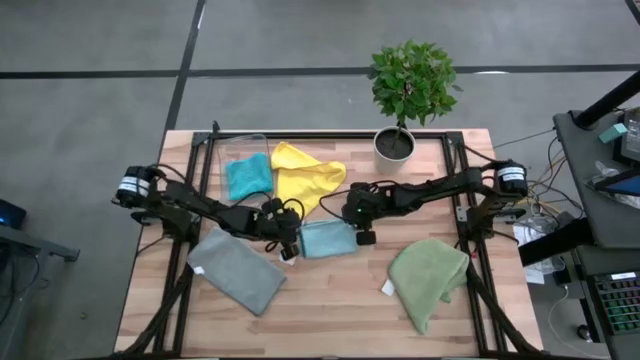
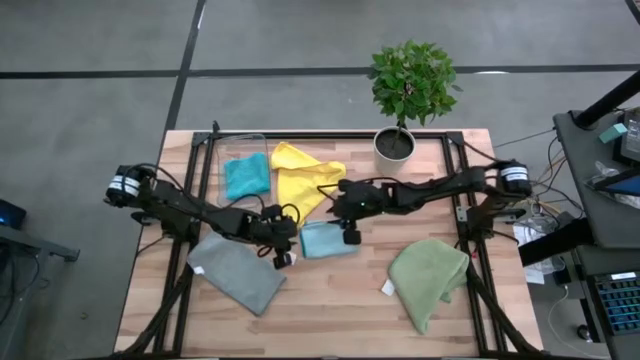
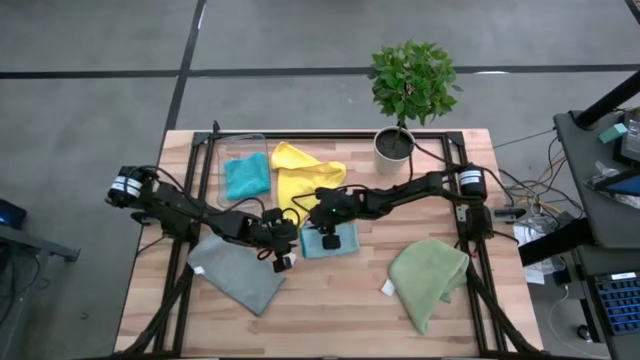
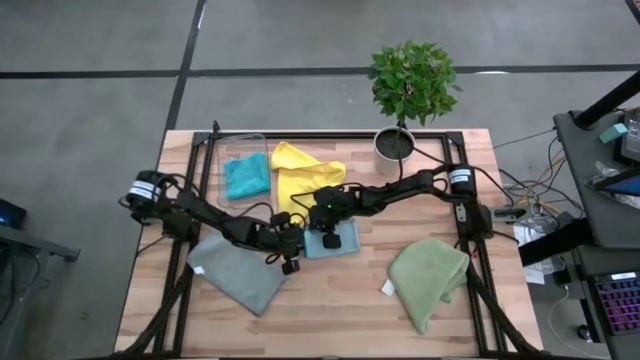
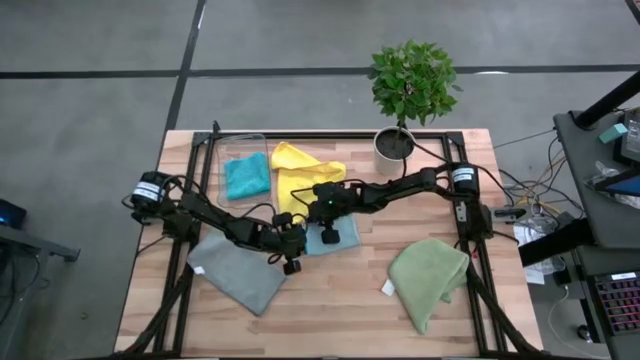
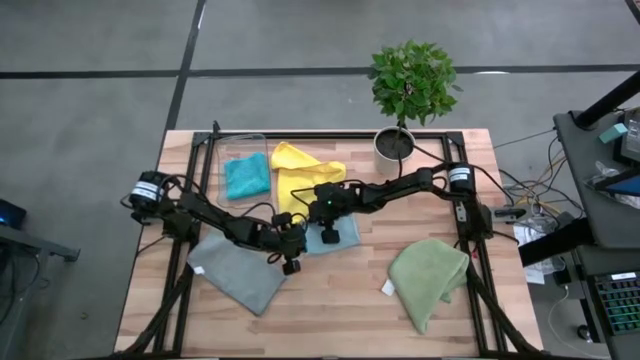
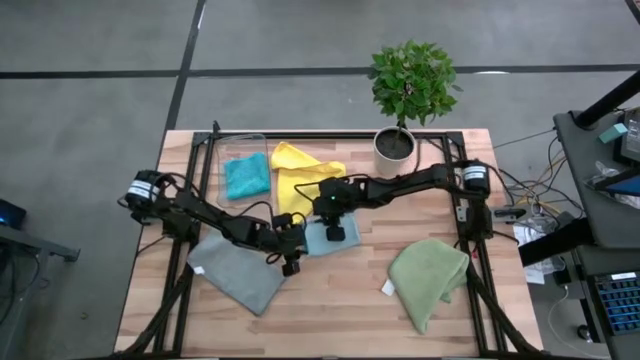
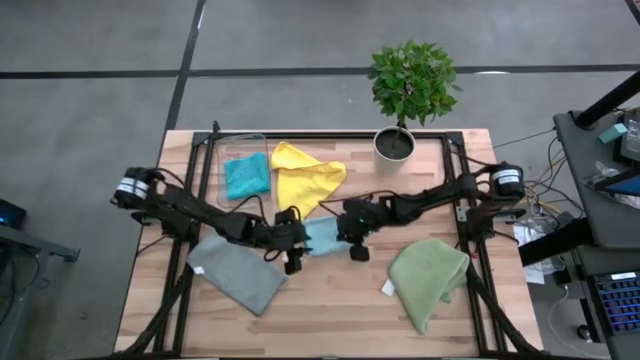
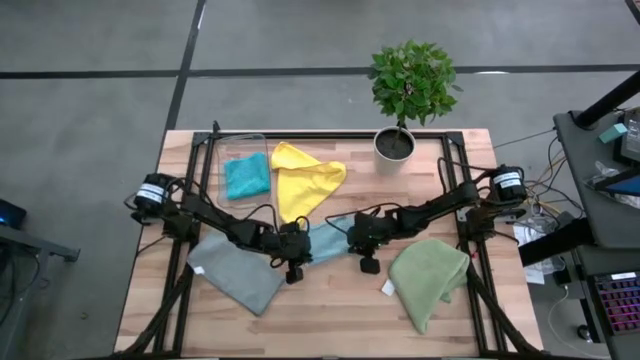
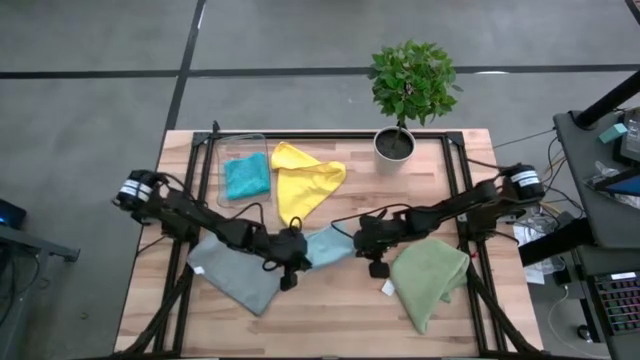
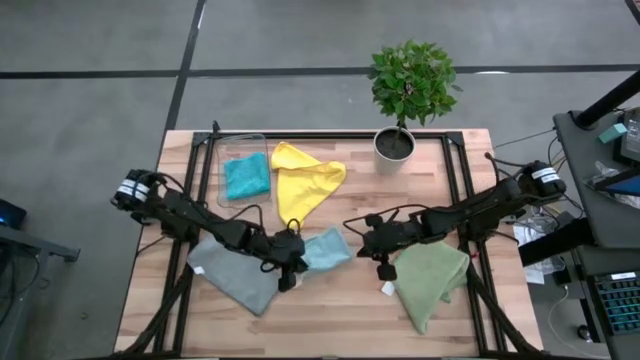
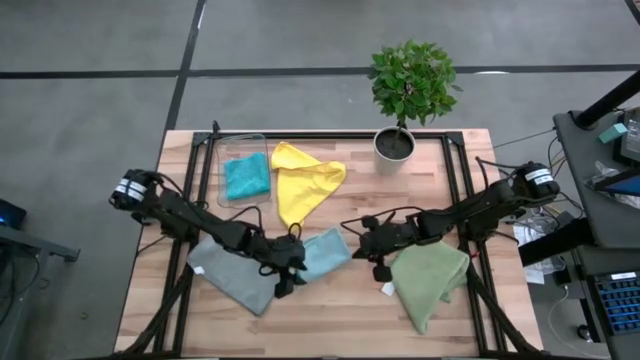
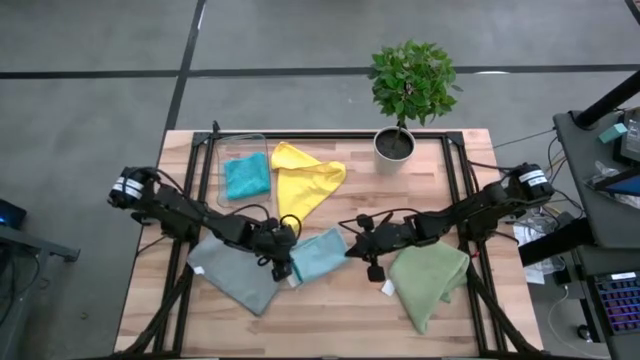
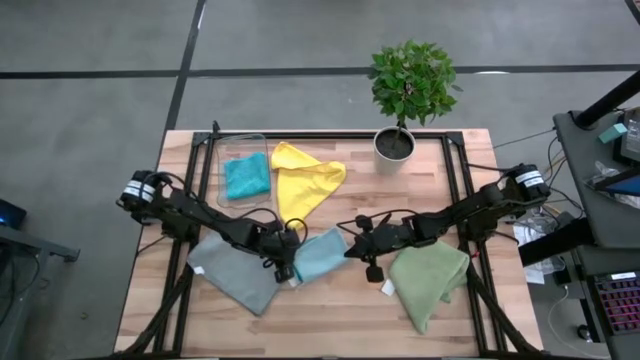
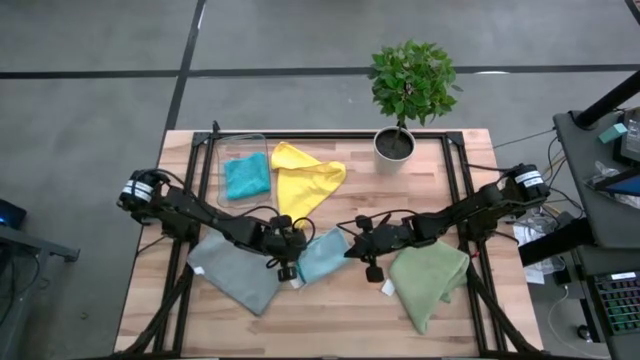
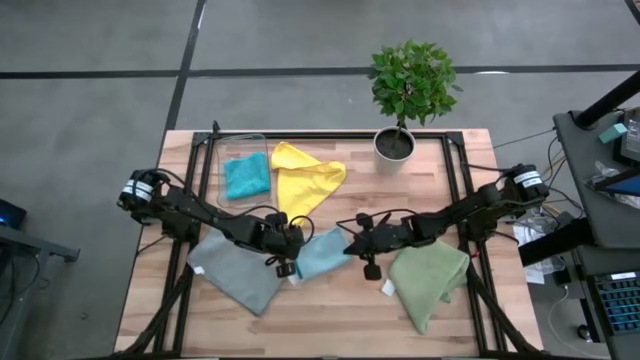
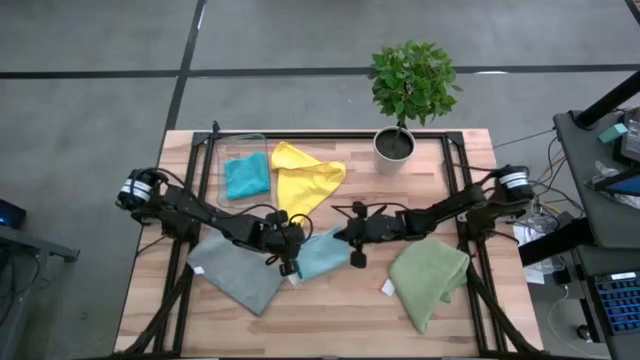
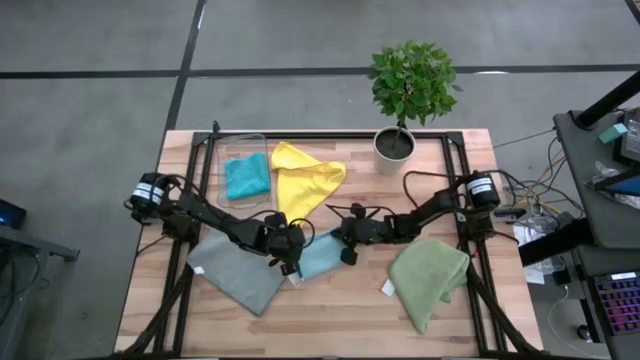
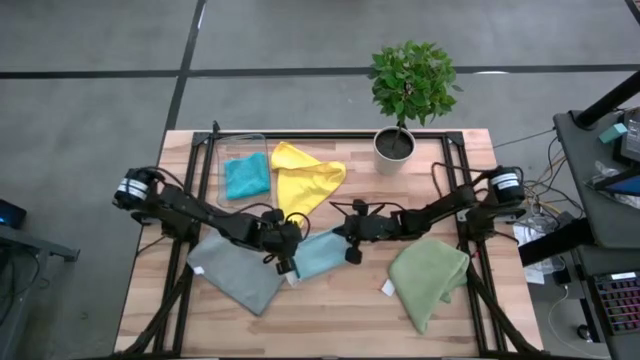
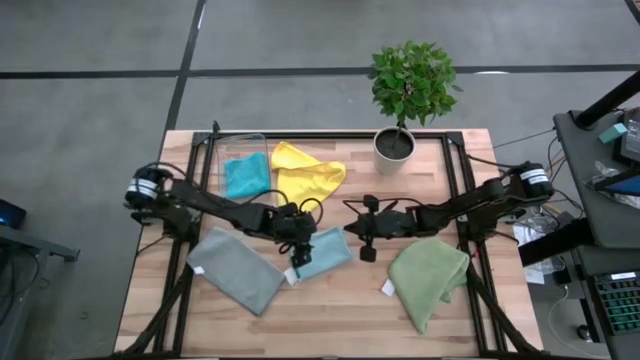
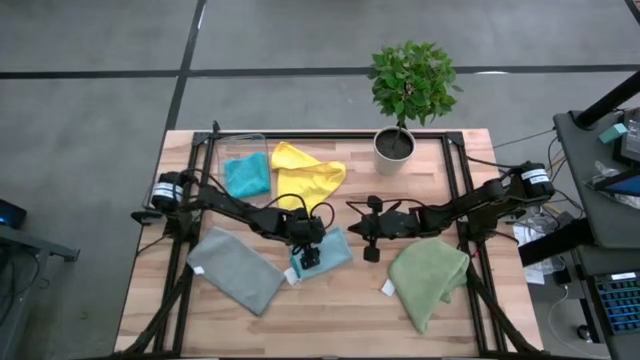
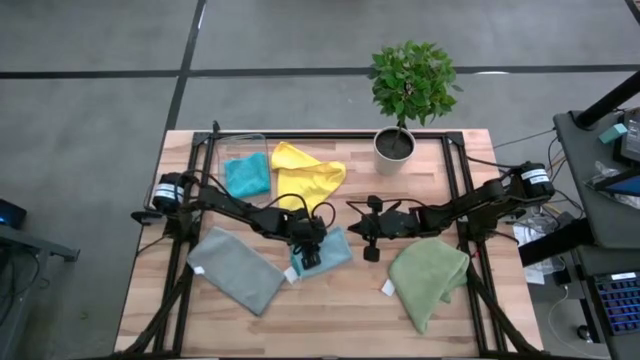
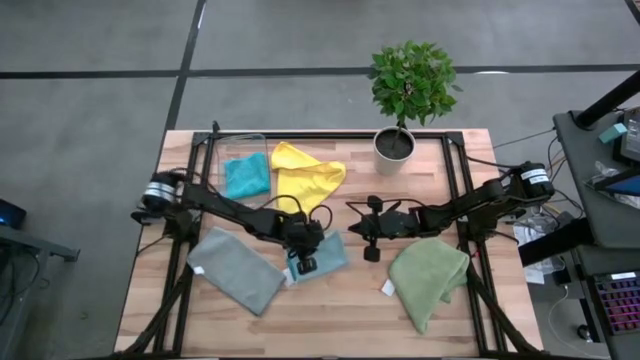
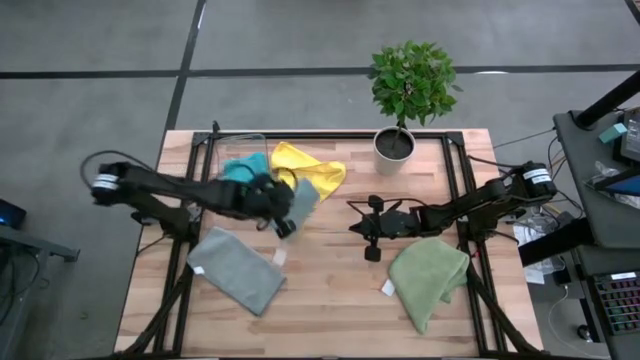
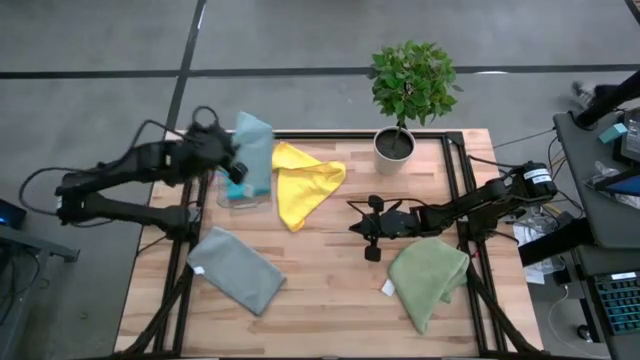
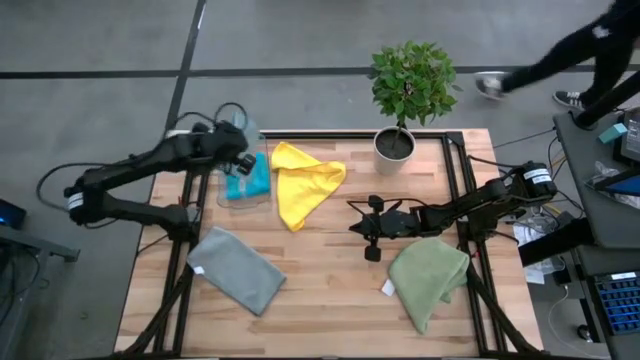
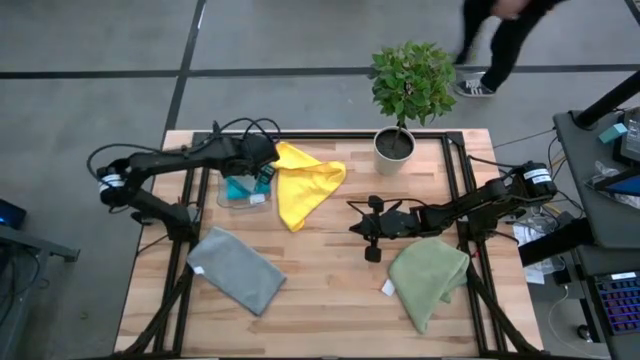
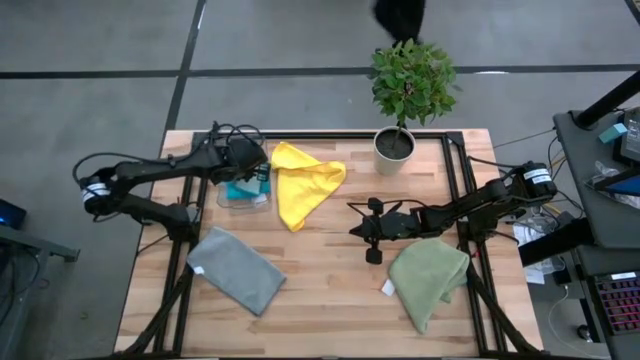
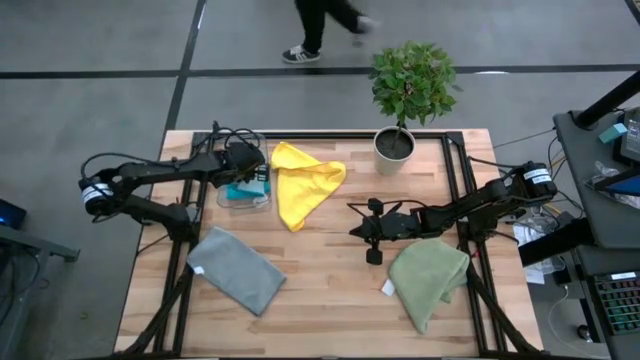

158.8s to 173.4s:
Task: Fold microfiber towels
Stack the folded light blue microfiber towel on top of the blue microfiber towel on the bin

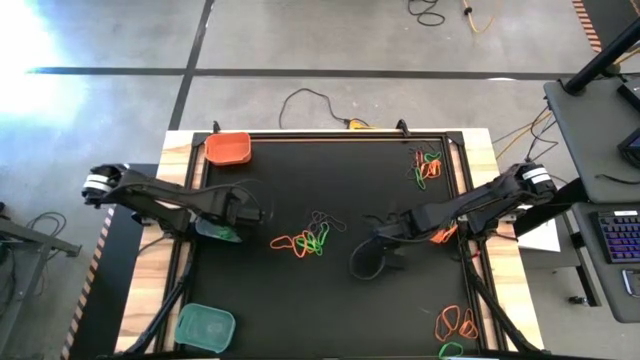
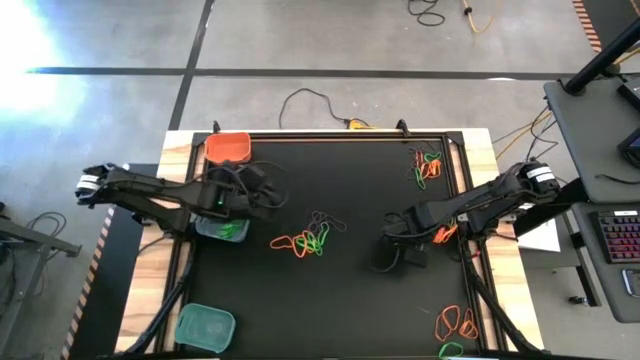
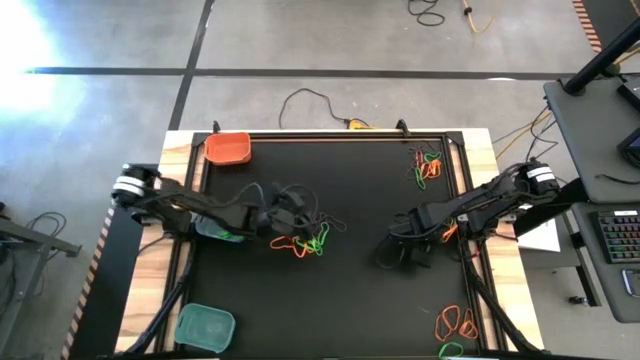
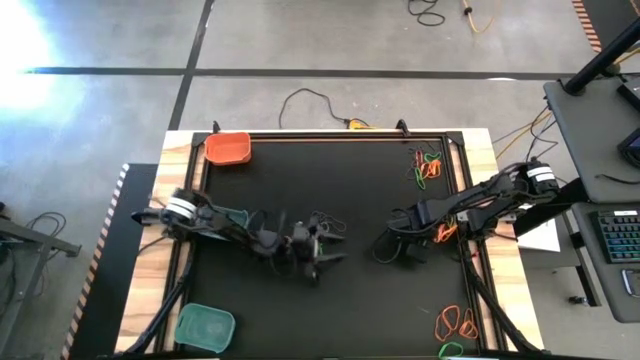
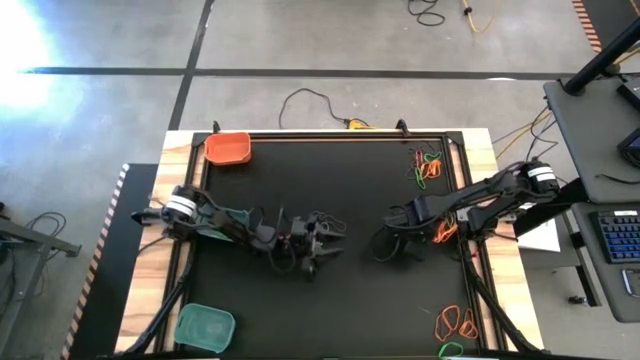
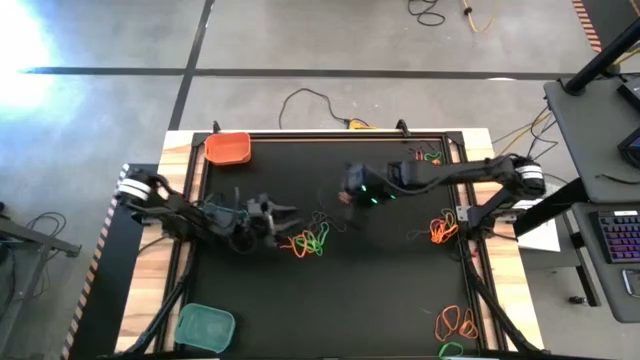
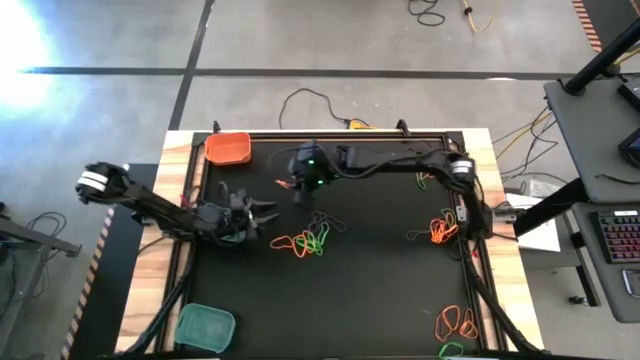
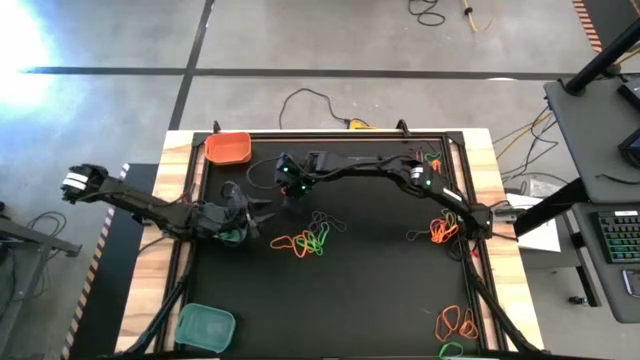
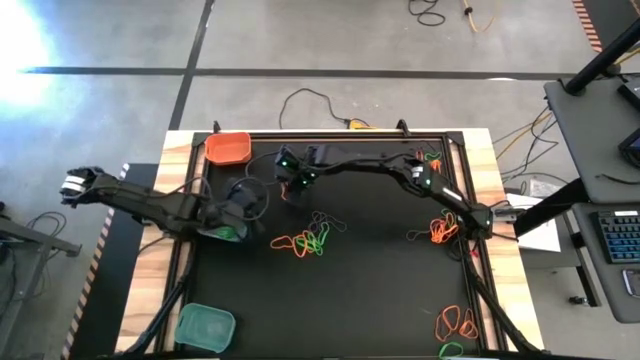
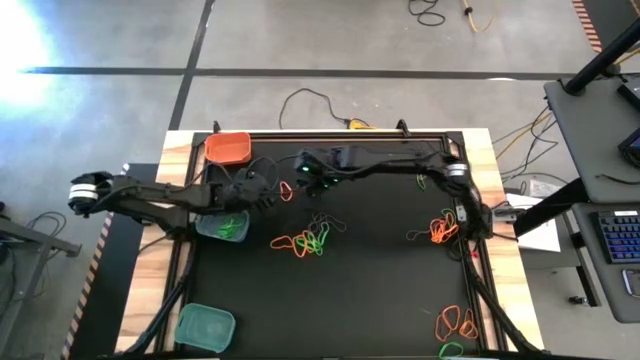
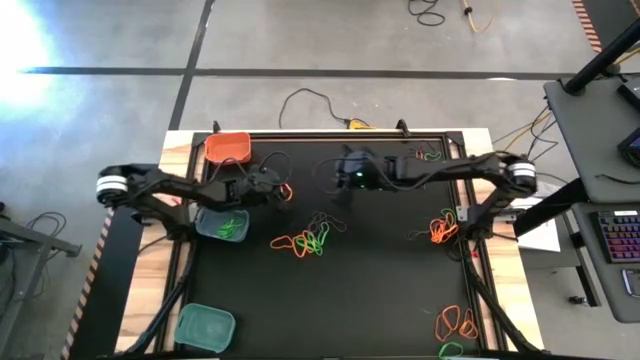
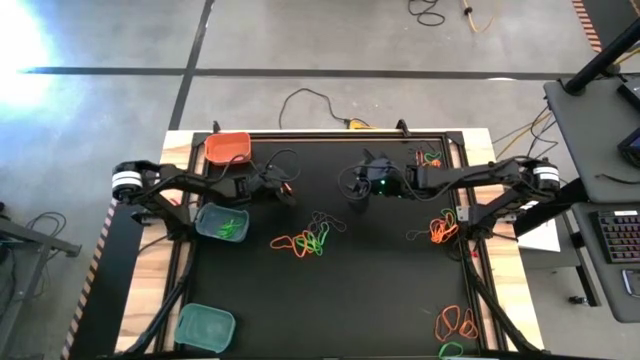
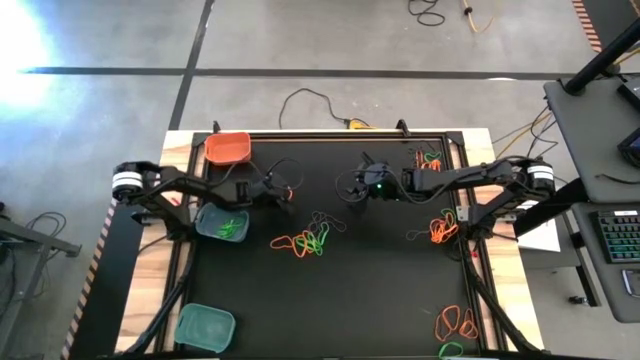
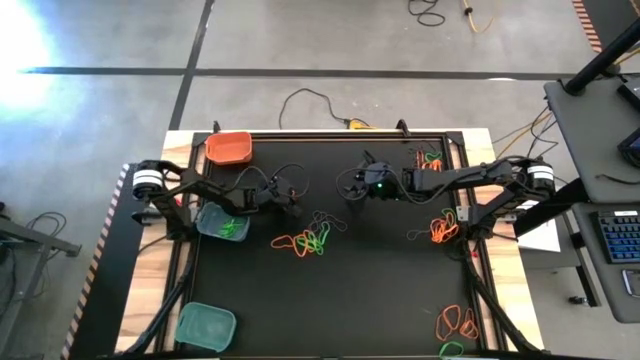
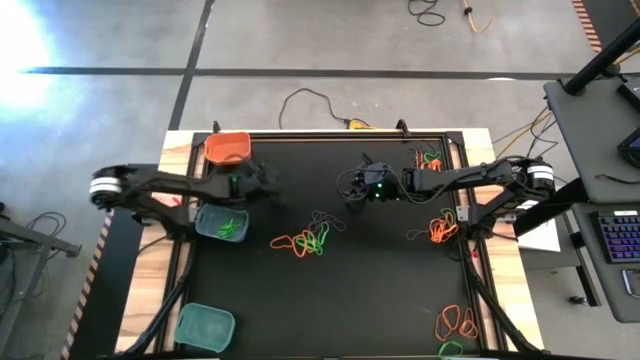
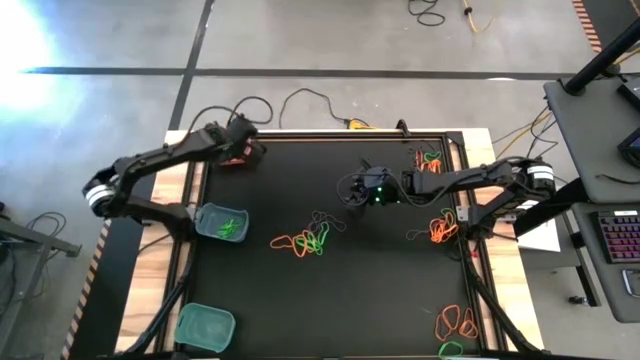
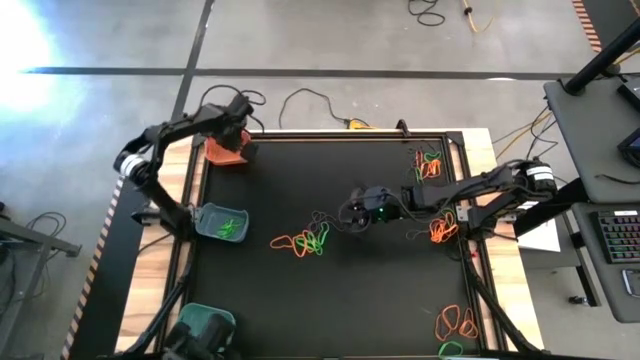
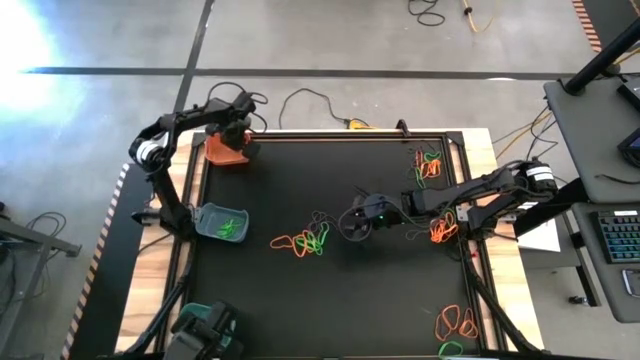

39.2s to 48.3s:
Task: Sort rubber bands into baskets
Put the orange rubber band into the orange bin
